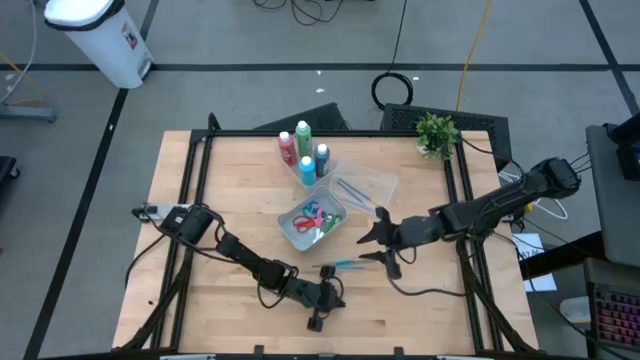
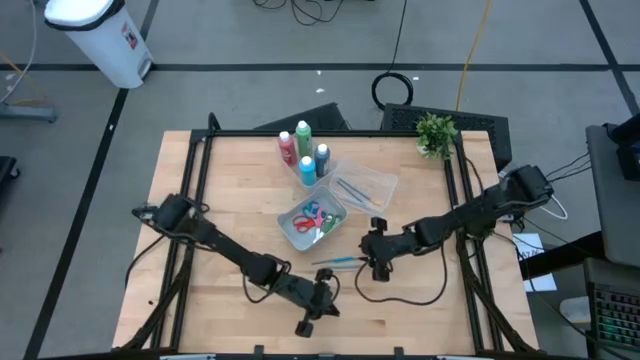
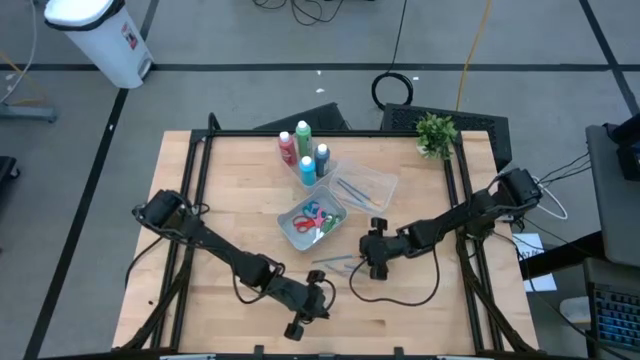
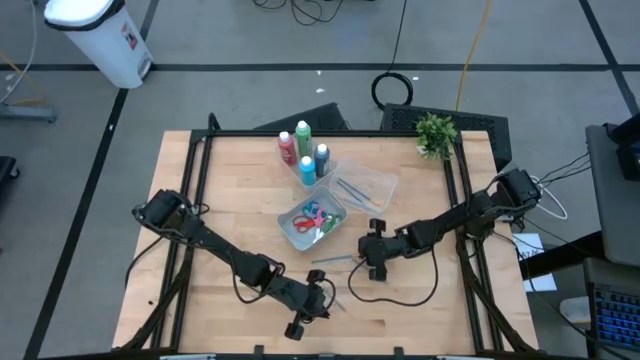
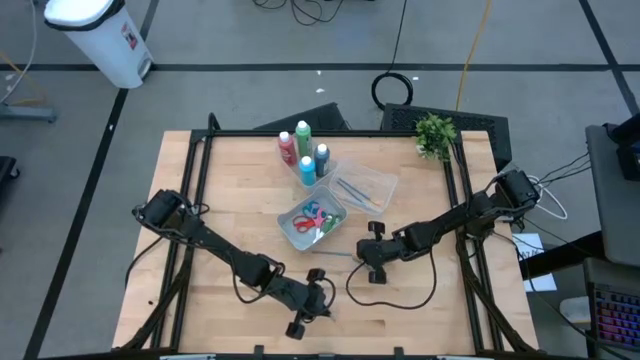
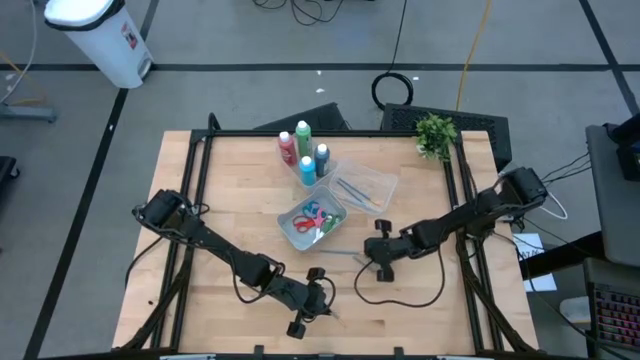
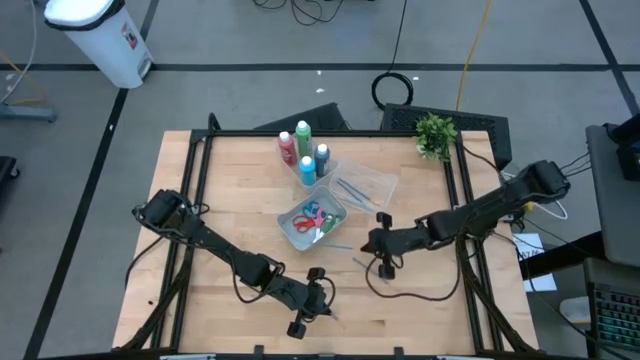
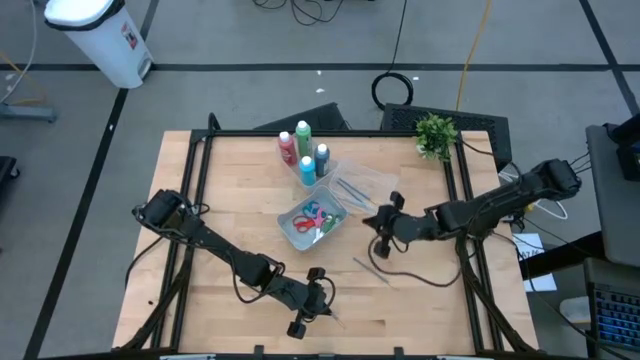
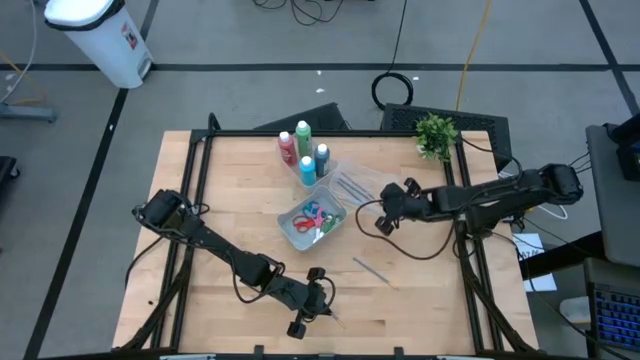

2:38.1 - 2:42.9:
Task: Pick & Place Paint Supplies
Put the blue paintbrush into the right transparent bin

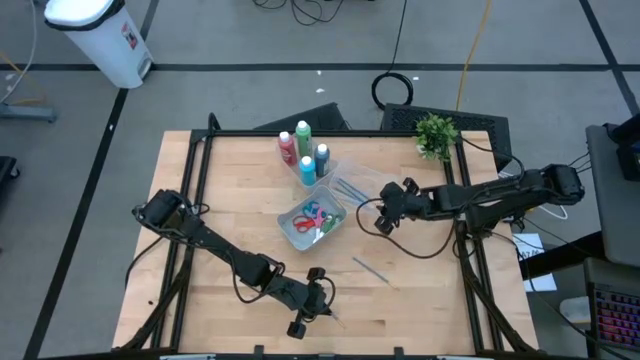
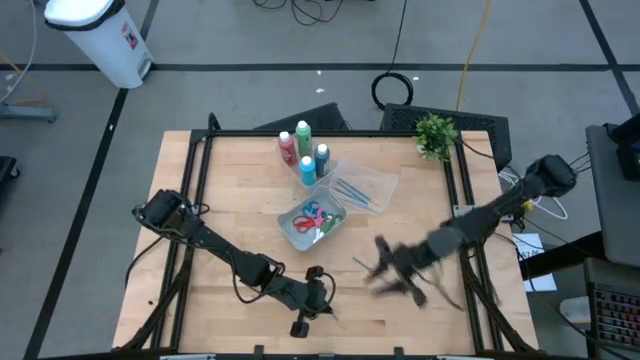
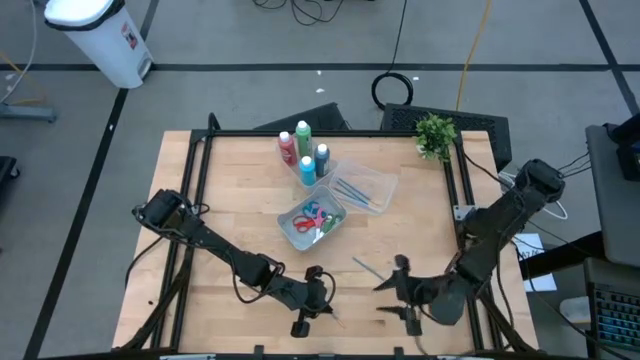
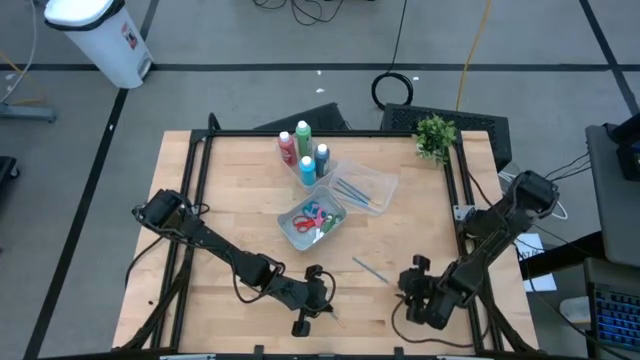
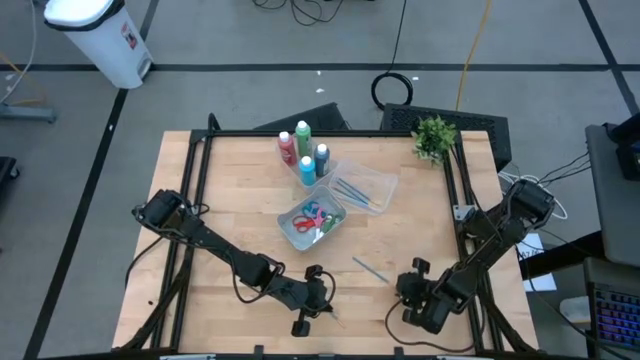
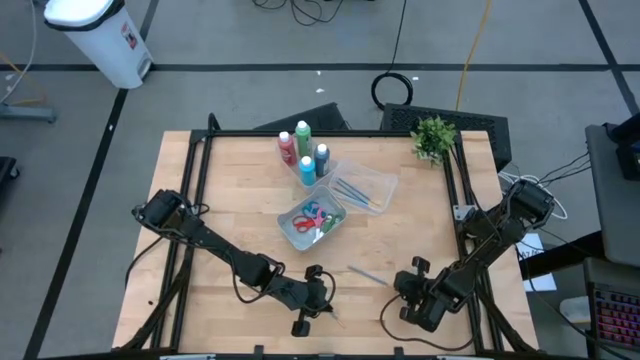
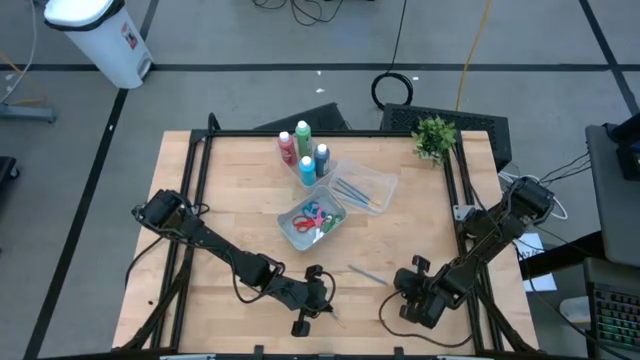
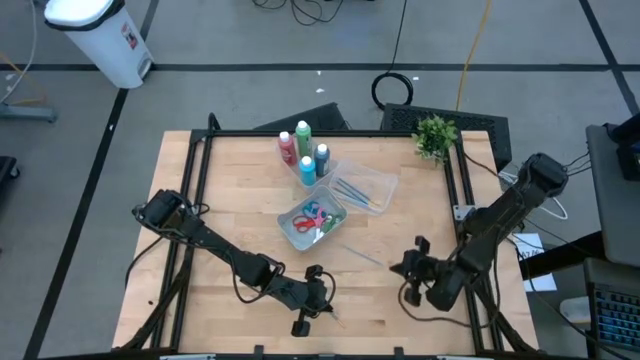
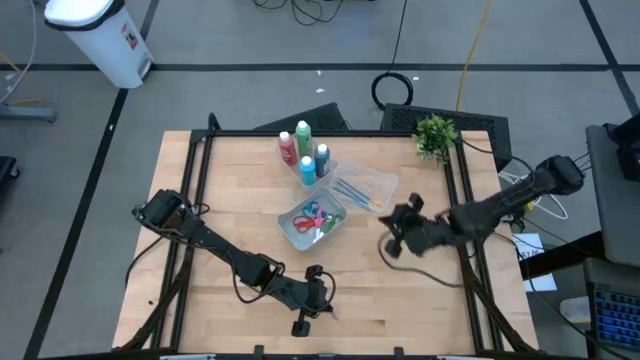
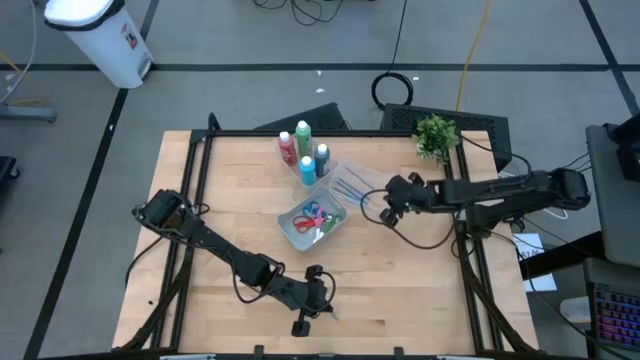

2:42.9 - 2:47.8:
Put the top blue paintbrush into the right transparent bin

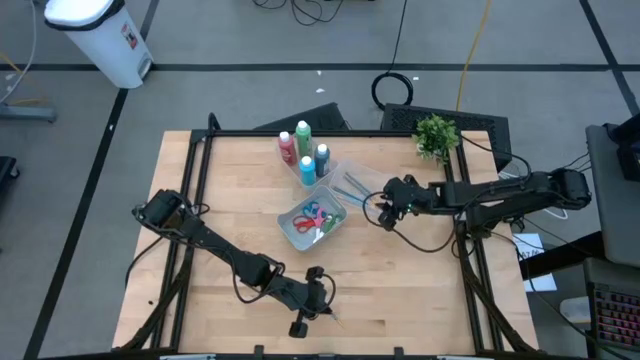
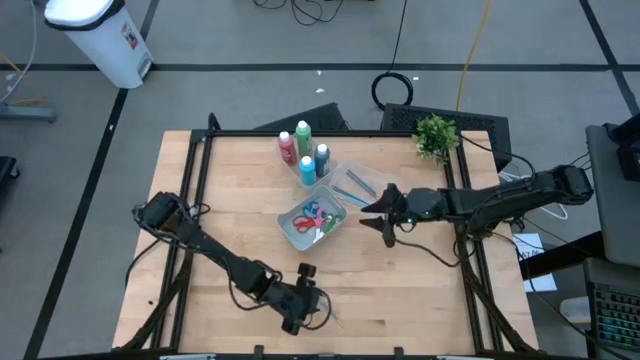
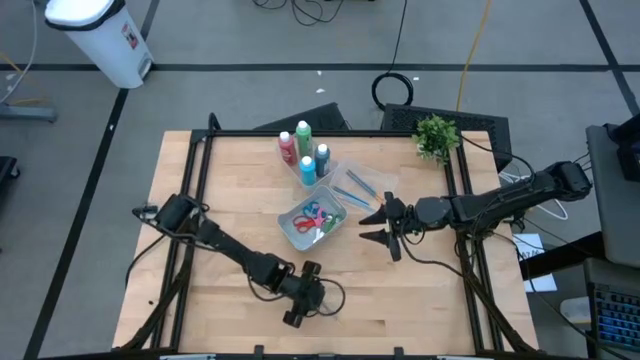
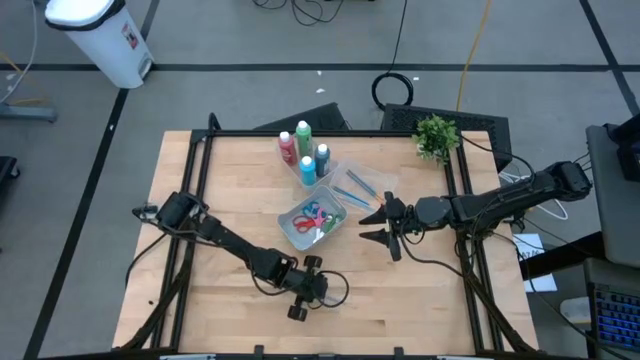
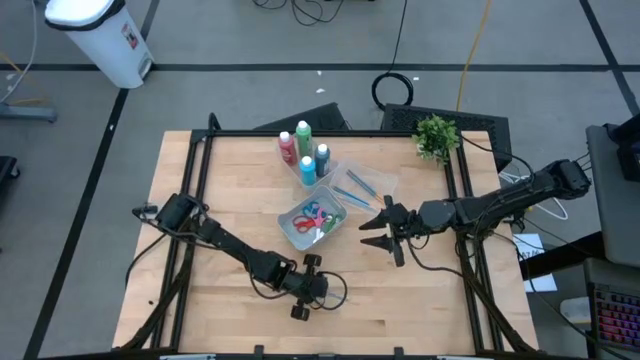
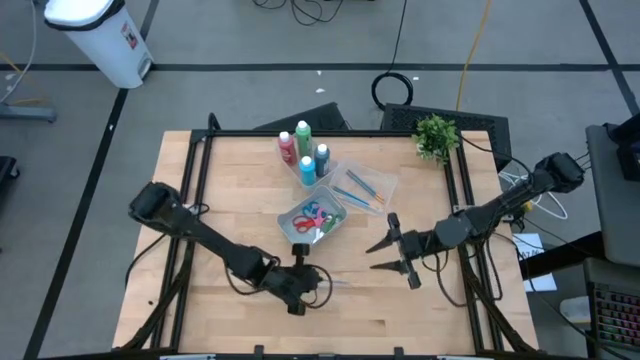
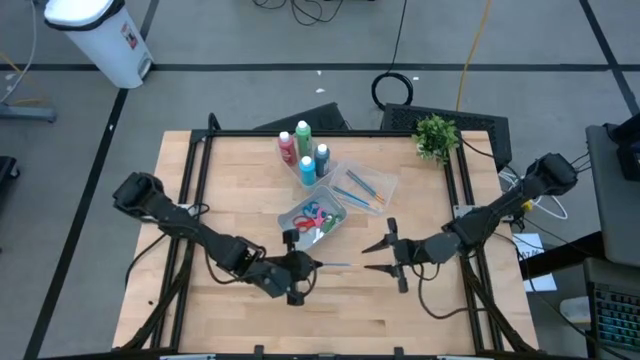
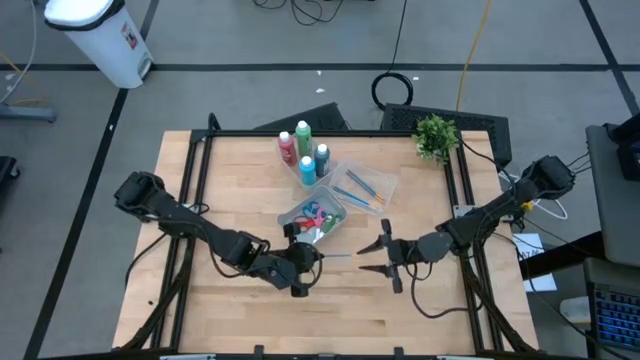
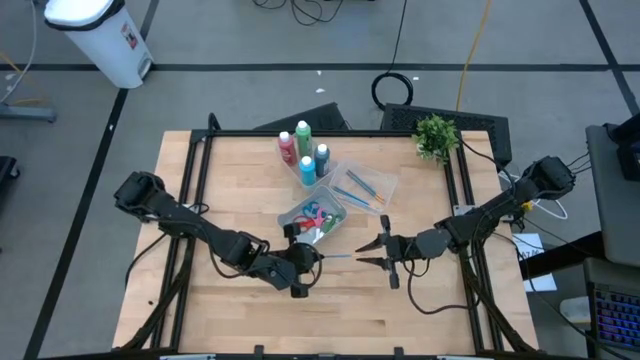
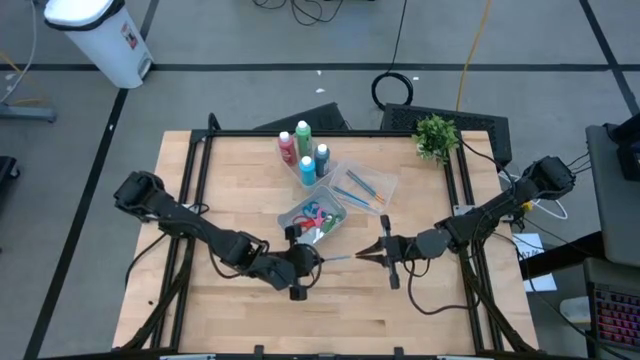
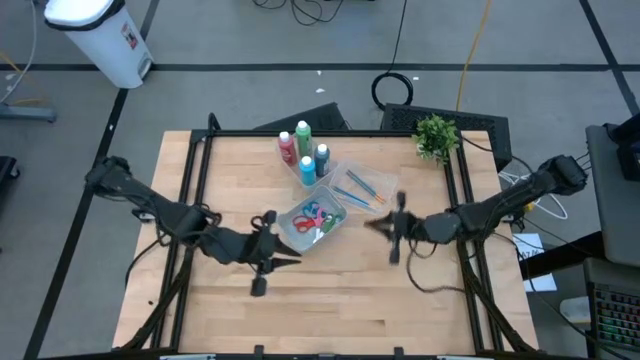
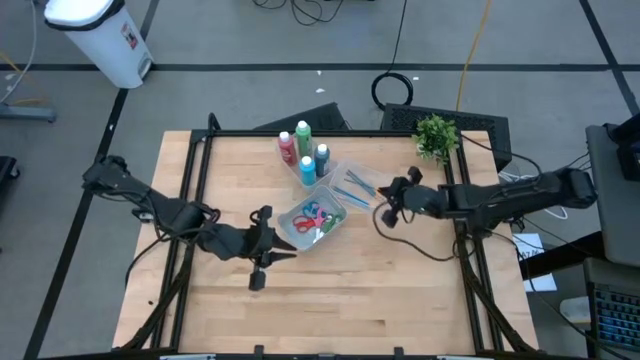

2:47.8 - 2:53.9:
Put the blue paintbrush into the right transparent bin

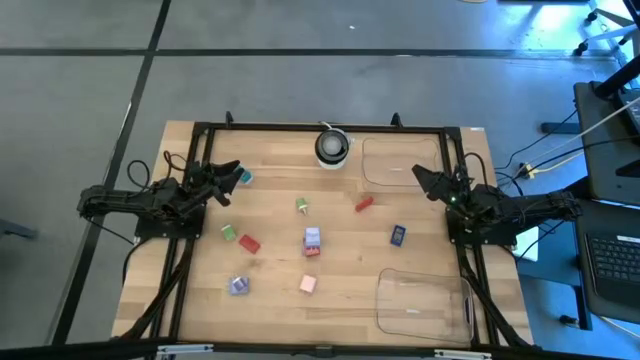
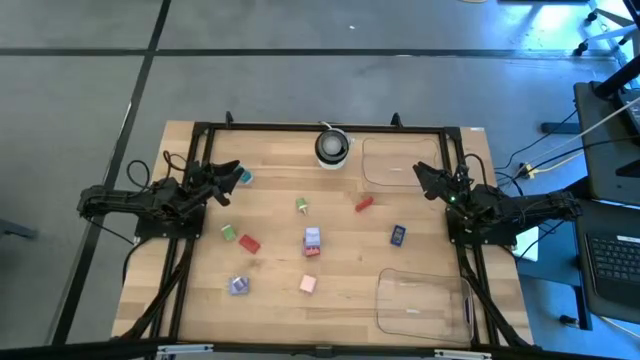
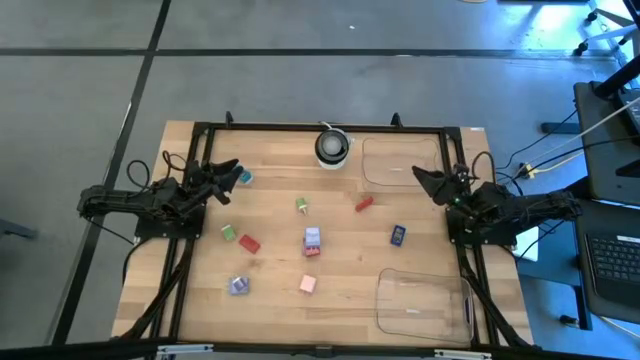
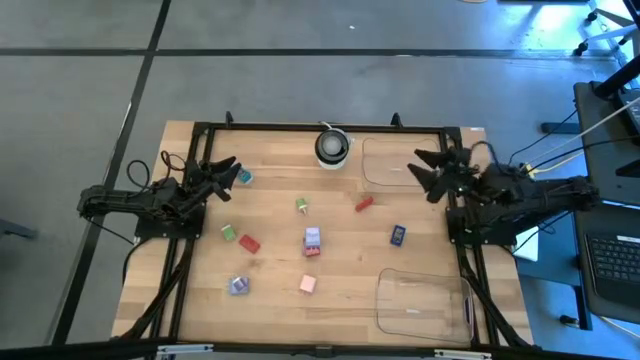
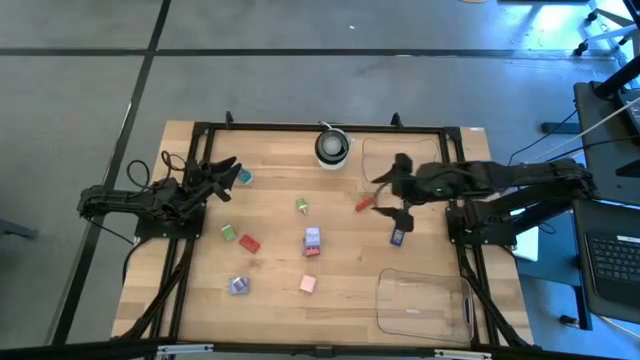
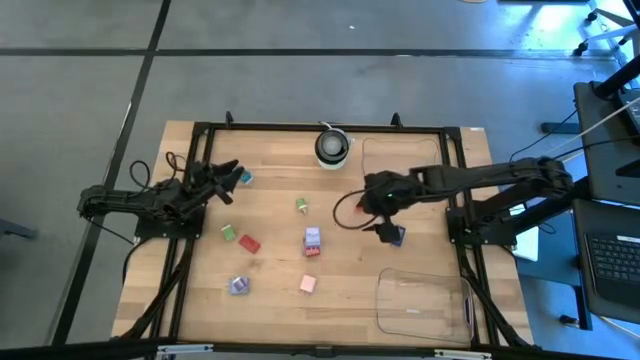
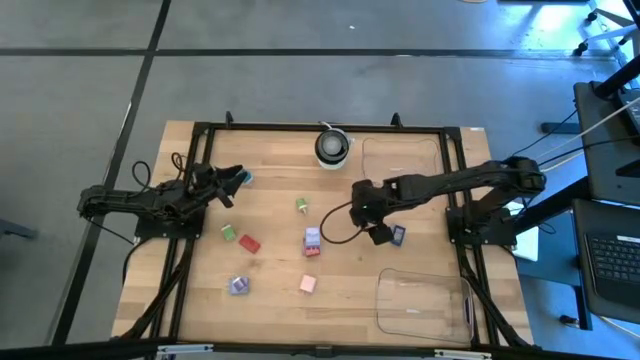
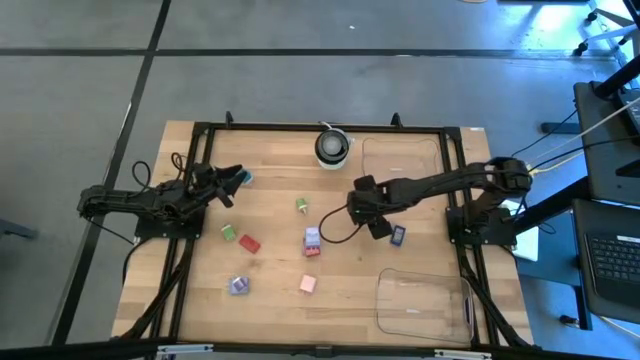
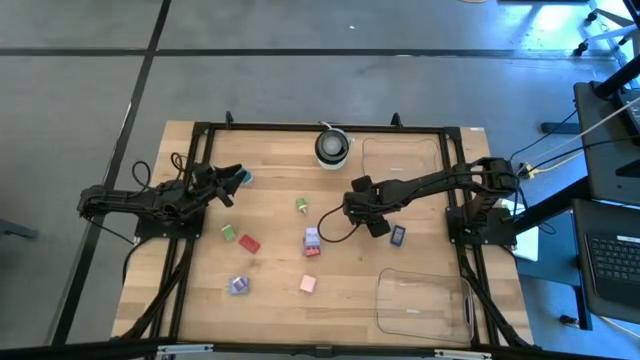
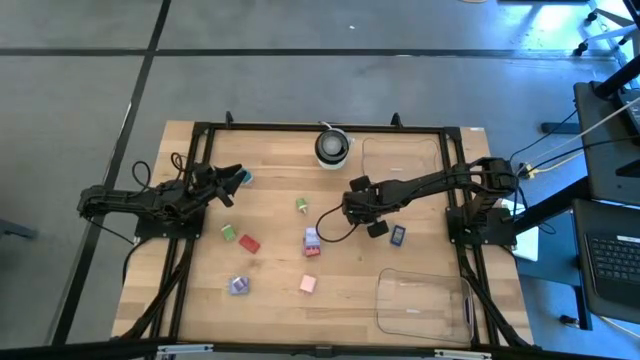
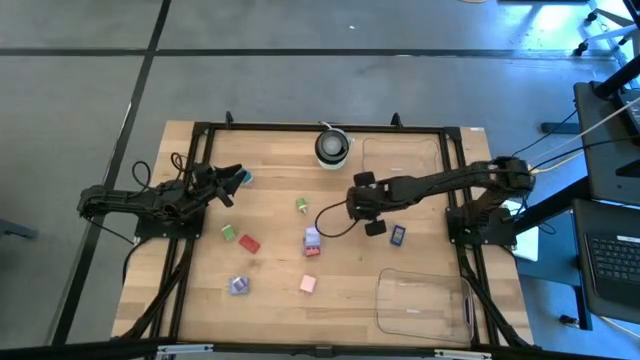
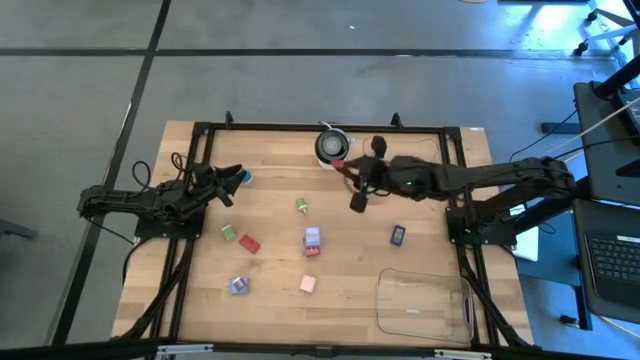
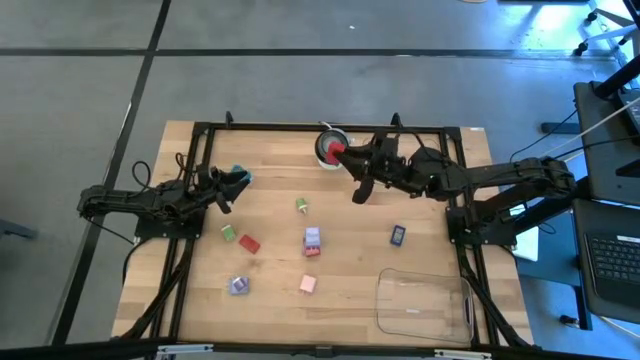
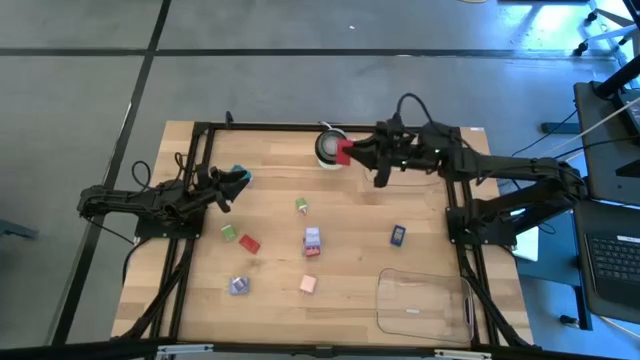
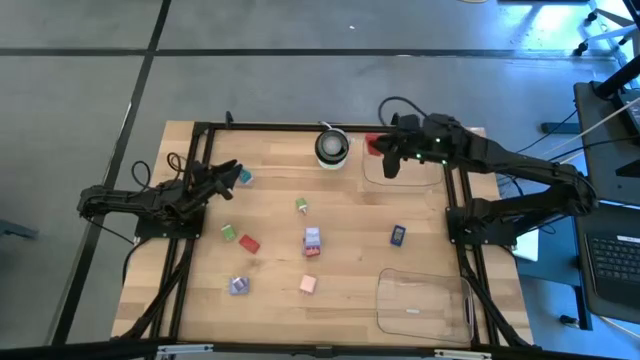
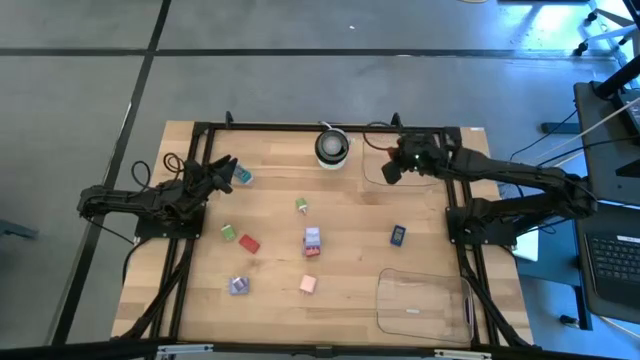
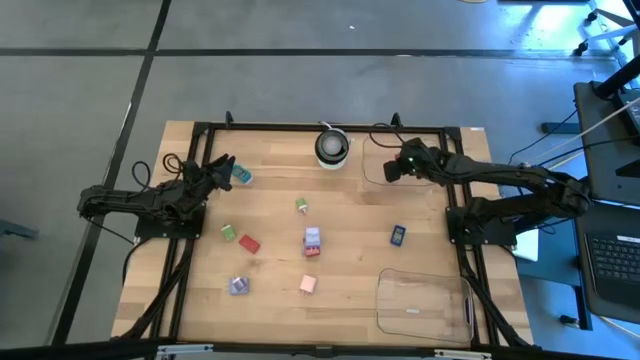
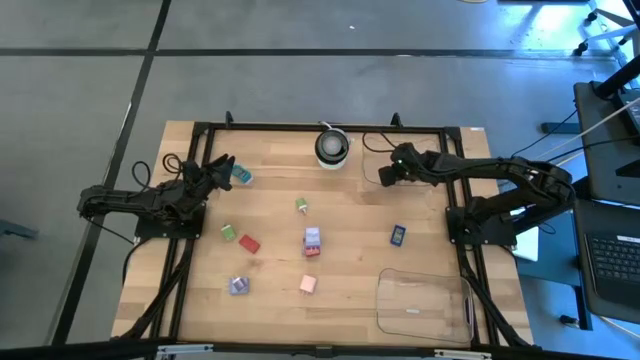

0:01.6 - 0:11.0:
Task: Pick & Place Office items
Put the top right red digital timer into the top transparent bin
